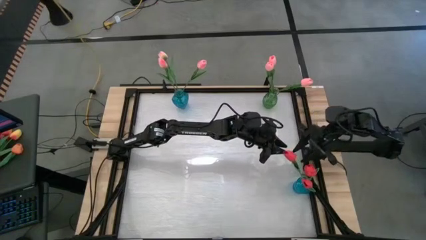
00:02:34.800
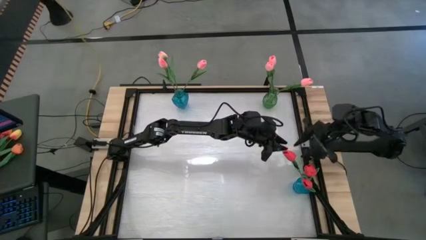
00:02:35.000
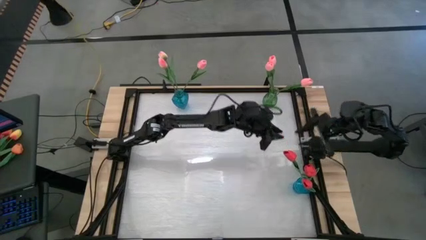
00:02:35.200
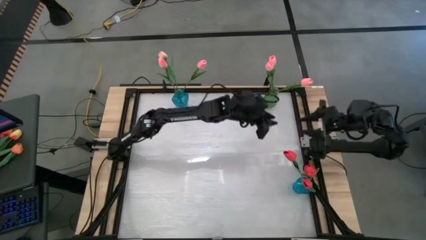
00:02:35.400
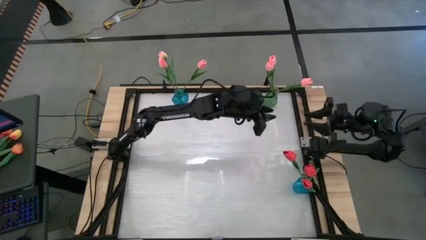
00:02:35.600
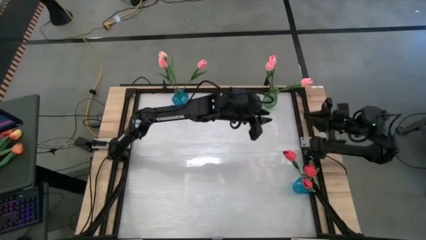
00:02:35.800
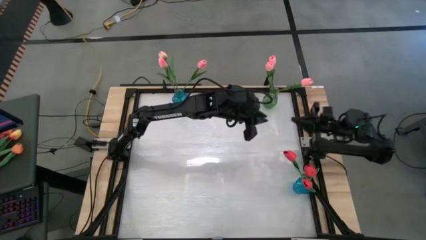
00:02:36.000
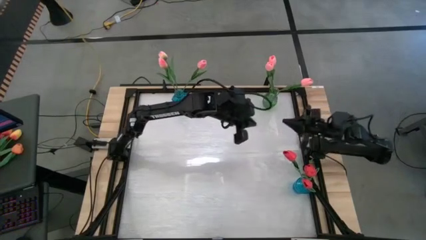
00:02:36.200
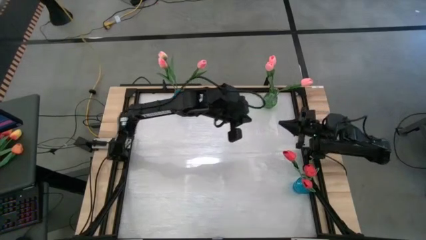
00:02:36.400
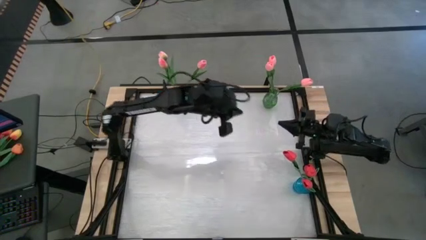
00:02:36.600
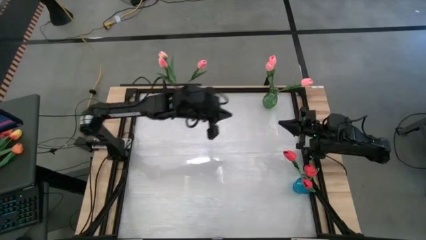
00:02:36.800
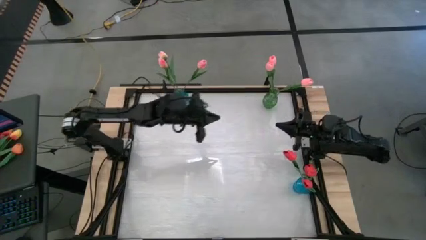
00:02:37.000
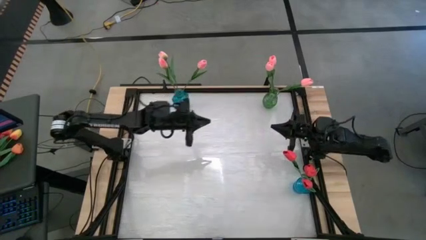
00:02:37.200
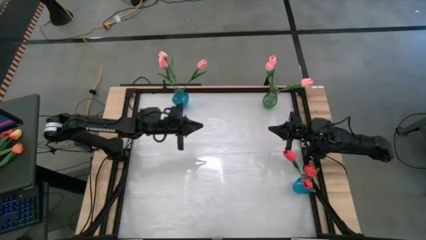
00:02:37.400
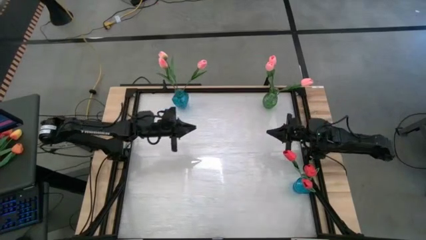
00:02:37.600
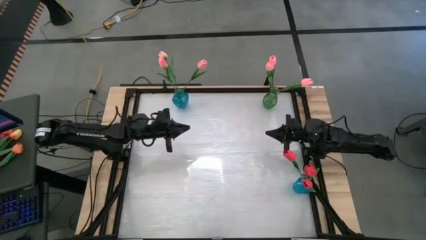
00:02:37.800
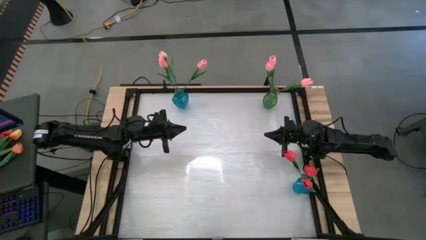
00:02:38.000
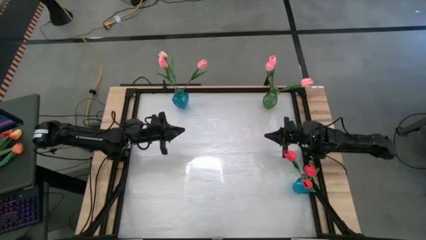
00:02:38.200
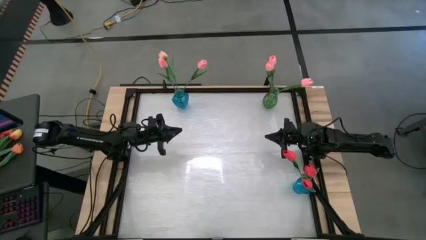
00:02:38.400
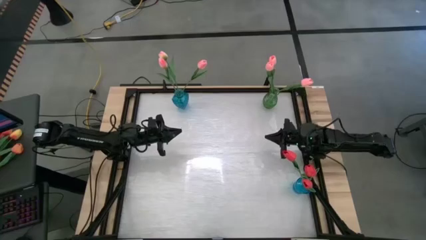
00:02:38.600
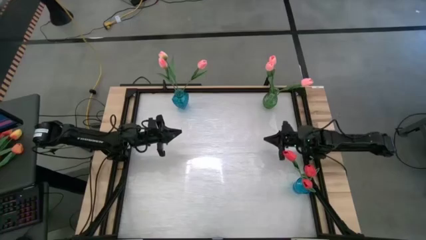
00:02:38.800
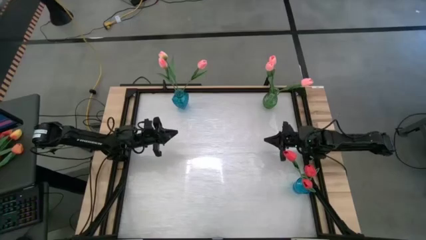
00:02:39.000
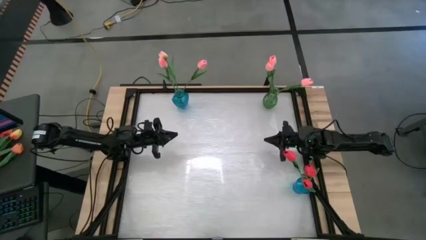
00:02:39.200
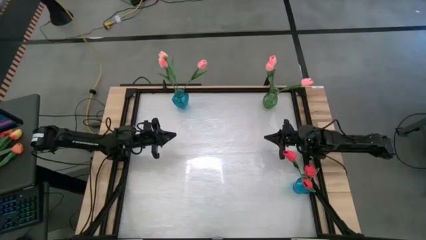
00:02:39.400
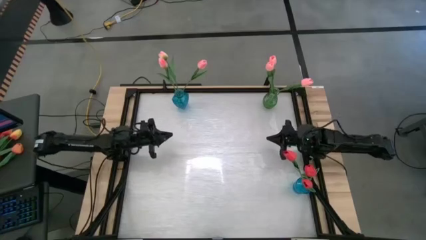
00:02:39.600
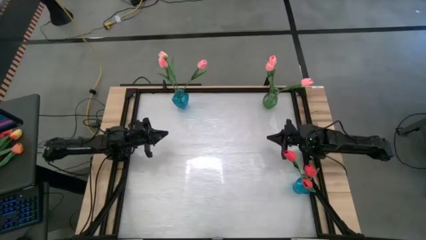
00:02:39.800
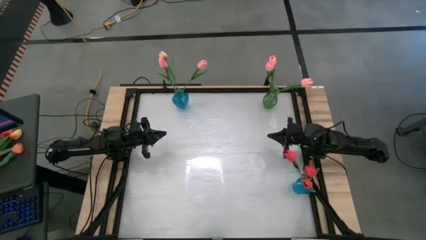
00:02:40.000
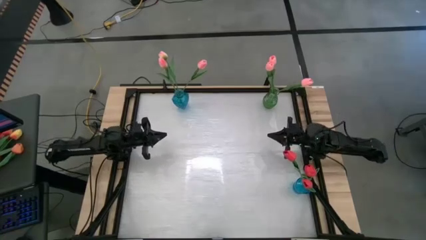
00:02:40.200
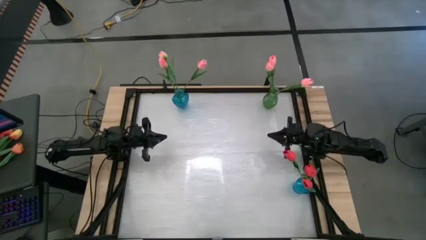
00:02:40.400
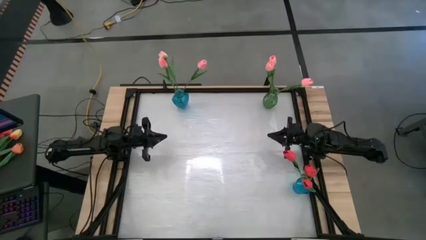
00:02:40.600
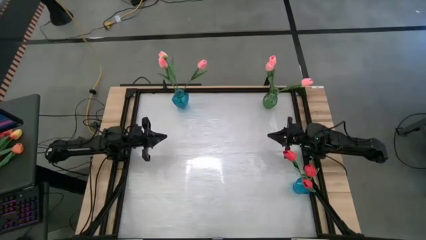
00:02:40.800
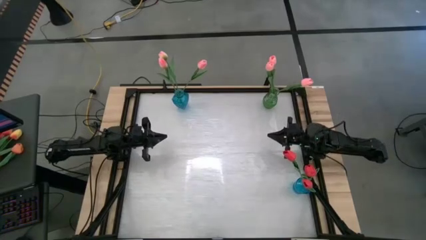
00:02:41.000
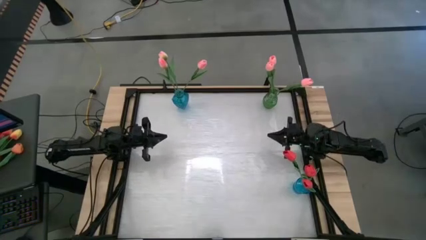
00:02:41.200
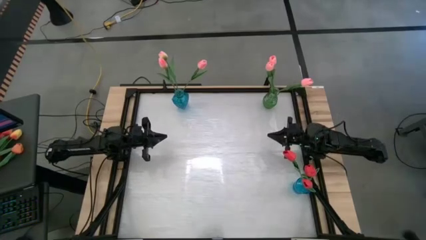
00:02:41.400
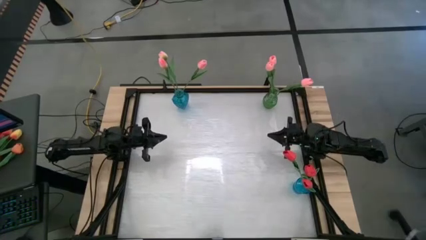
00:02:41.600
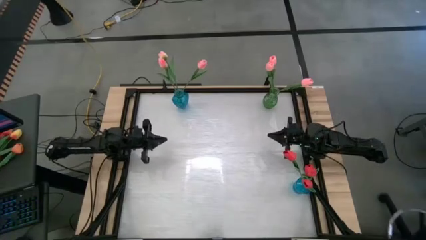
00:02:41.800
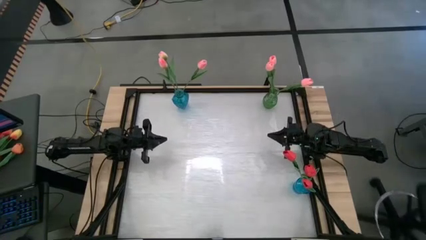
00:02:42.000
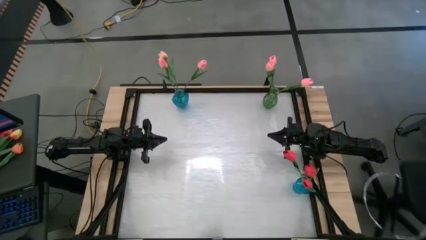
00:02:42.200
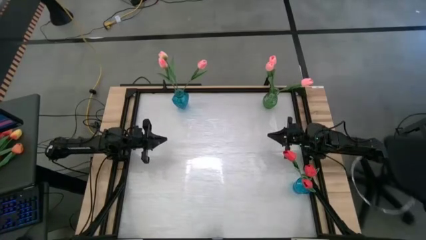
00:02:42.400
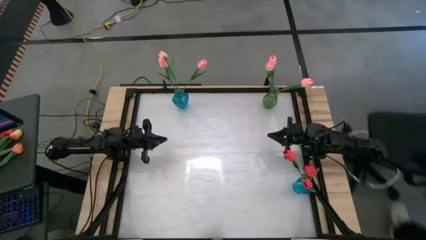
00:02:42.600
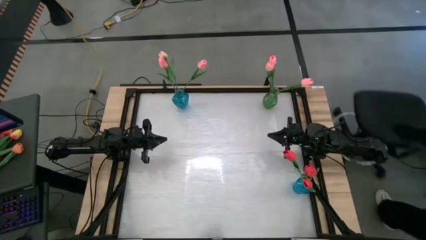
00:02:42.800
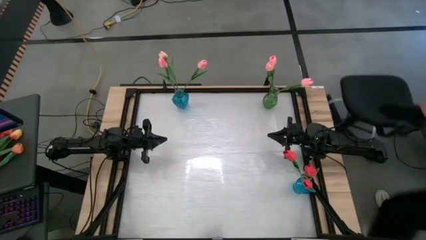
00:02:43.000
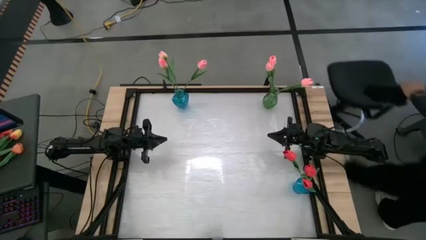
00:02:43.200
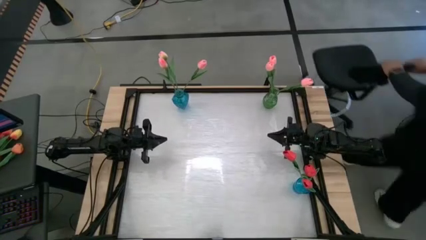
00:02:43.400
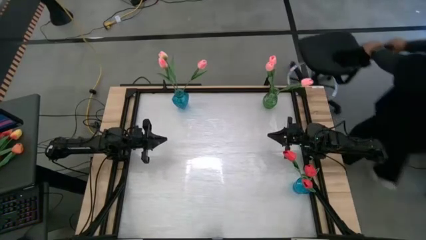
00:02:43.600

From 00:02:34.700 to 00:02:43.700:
Task: Sort flowers into vase by color
Return to Home Position

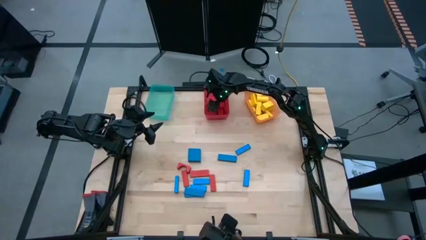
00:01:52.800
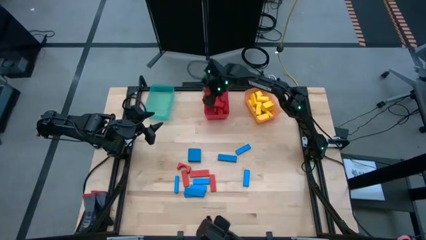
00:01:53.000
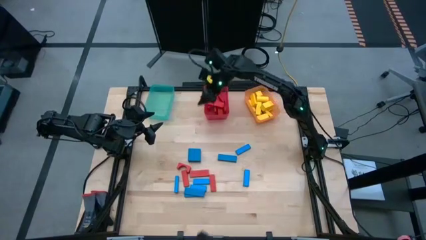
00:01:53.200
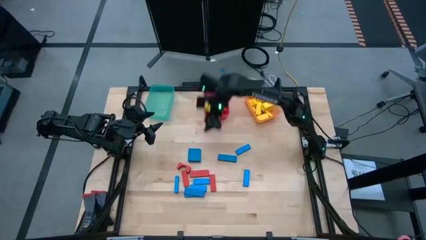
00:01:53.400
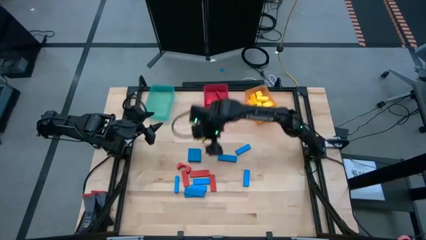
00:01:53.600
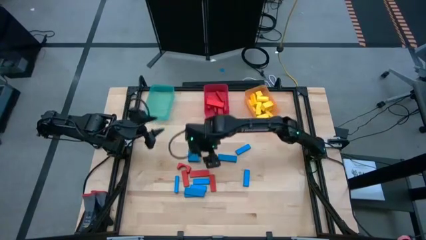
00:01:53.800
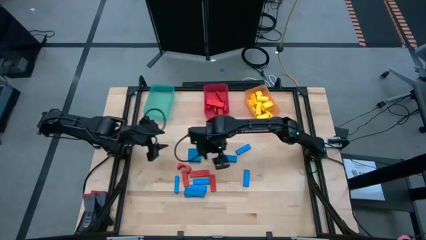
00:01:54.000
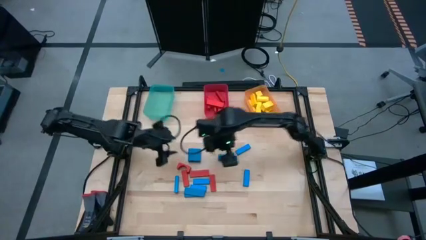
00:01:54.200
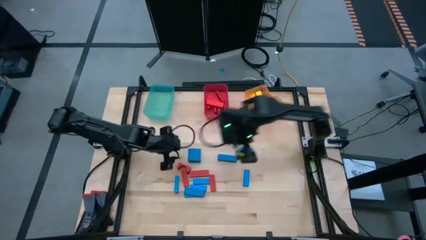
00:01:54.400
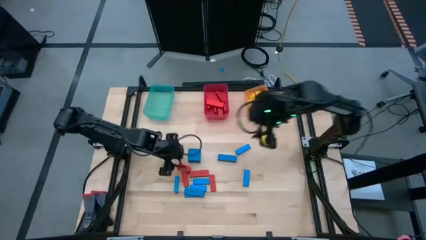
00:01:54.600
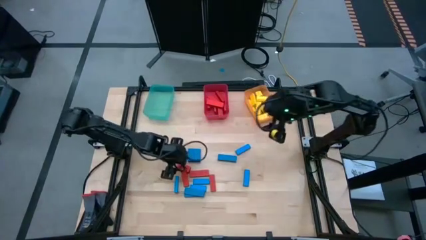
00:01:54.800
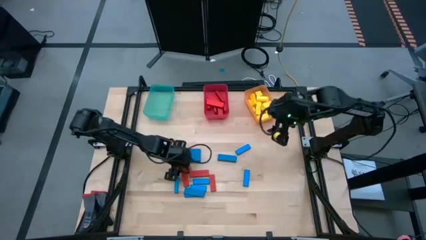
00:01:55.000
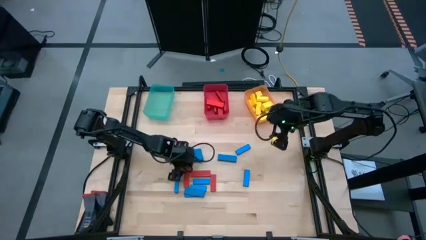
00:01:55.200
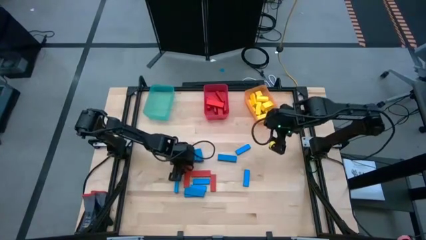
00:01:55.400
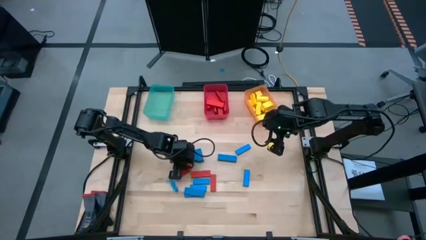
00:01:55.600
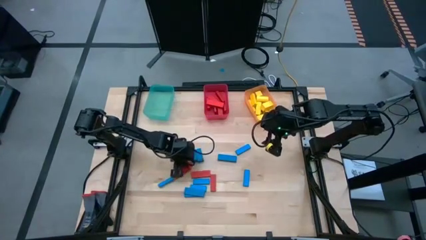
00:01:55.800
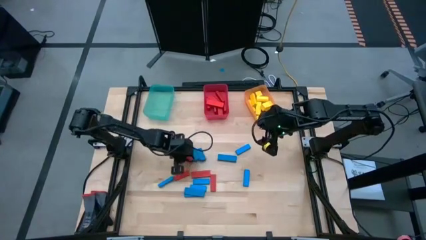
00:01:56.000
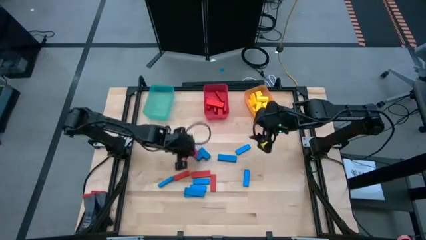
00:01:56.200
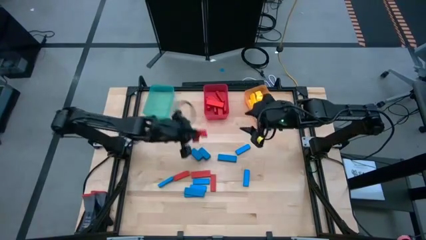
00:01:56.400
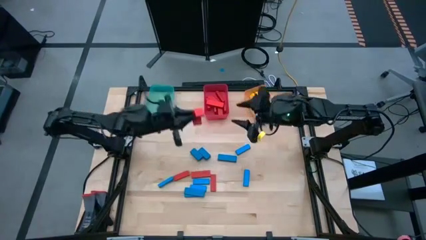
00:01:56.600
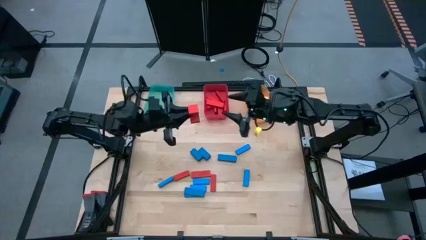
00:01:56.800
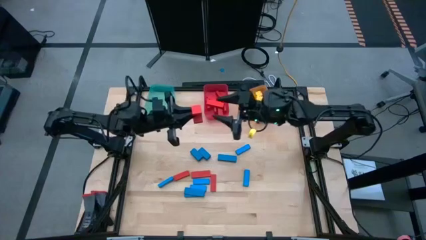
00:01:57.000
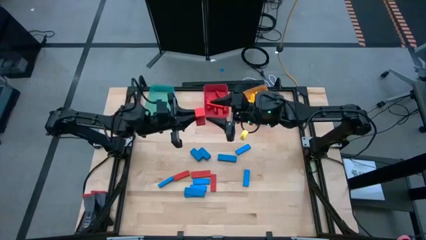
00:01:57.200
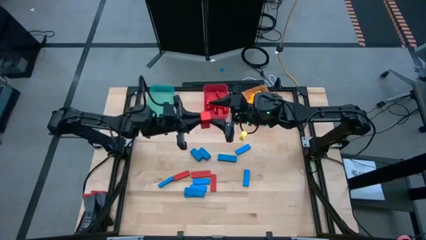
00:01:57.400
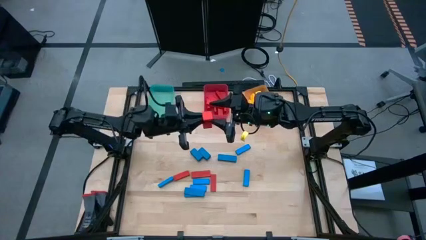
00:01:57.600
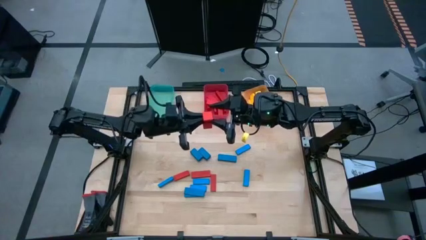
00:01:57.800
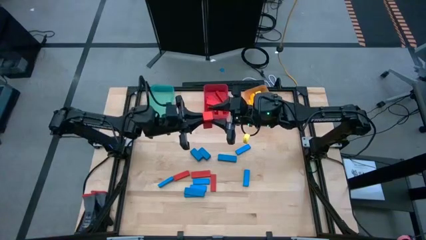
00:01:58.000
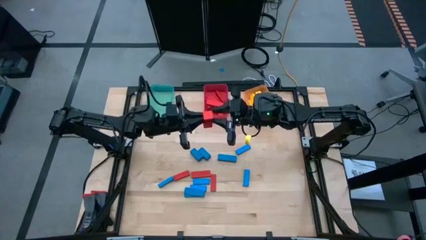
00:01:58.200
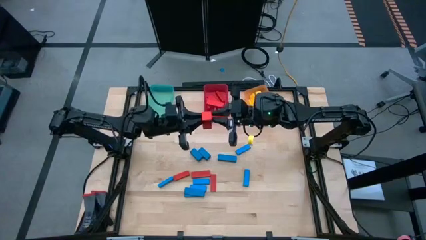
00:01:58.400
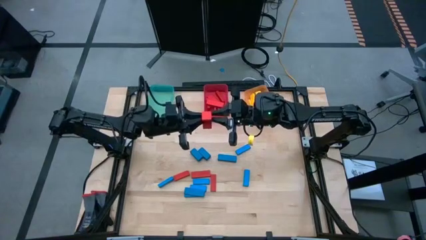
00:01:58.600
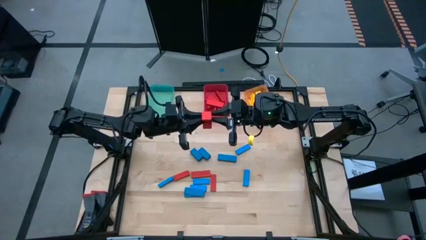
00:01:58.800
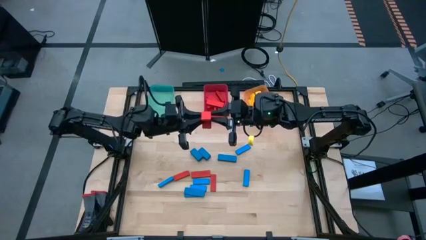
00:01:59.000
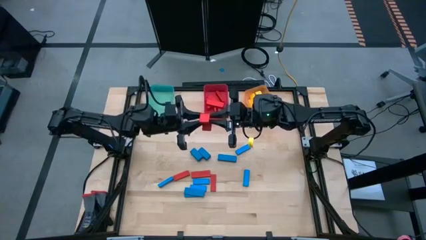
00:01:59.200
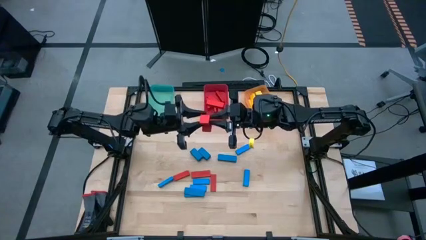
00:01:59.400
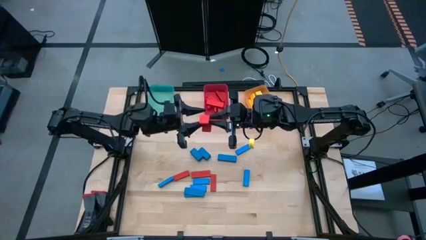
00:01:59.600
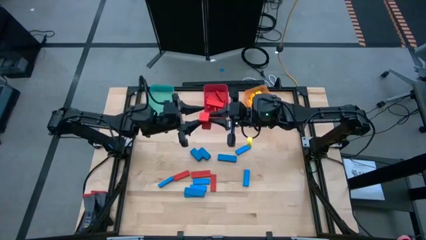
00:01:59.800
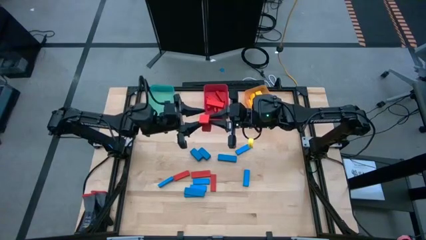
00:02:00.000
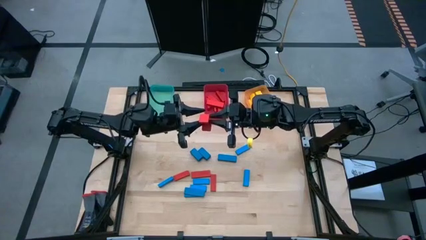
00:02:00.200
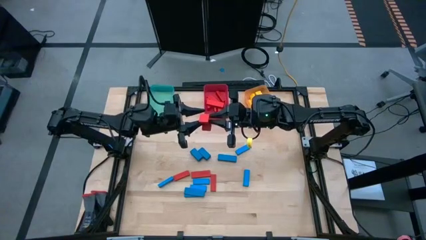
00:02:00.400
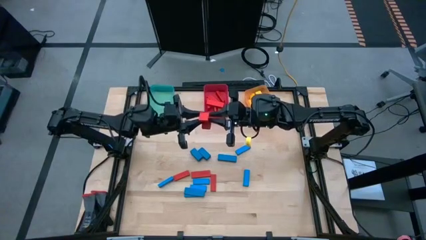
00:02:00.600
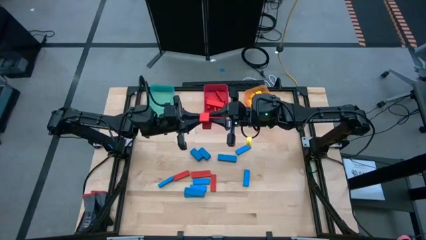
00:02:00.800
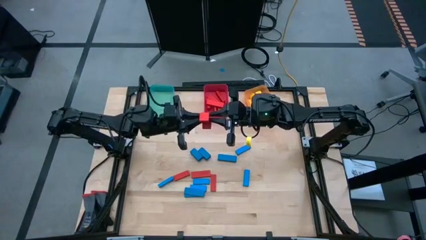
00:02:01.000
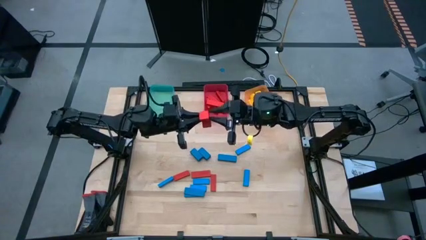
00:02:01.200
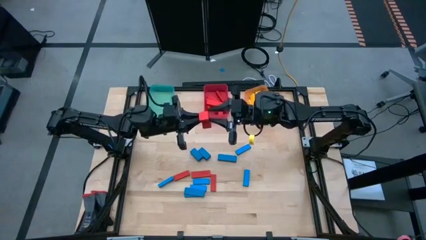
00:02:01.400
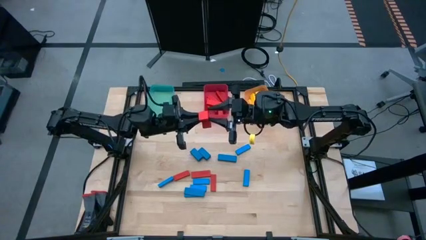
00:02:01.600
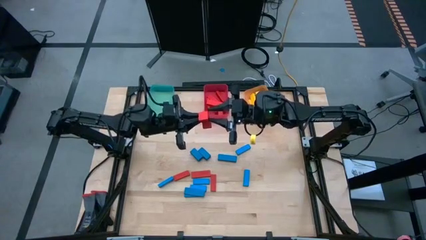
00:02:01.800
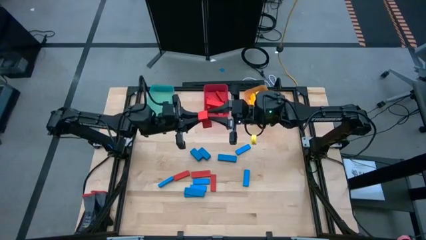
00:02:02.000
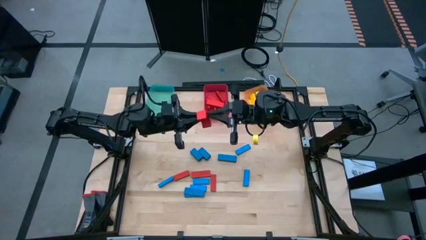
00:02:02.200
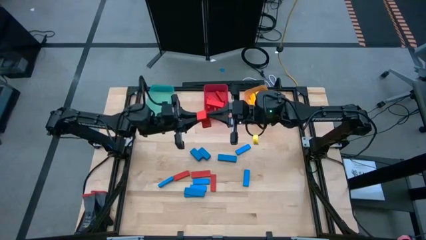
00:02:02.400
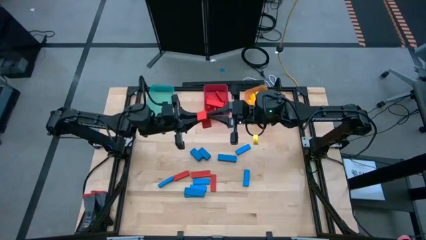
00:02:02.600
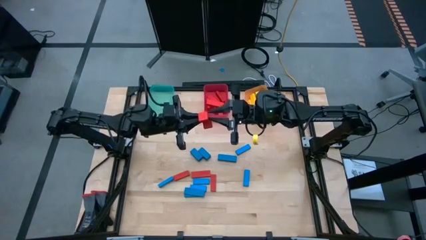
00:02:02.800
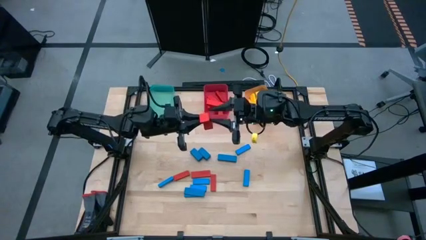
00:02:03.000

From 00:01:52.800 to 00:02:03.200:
Task: Sort blocks
Put the red block into the red bin
